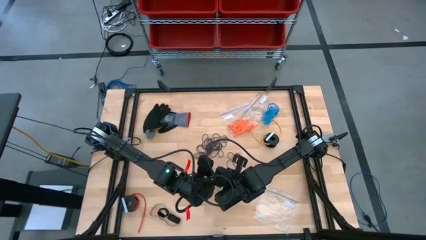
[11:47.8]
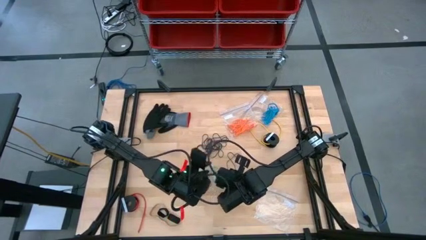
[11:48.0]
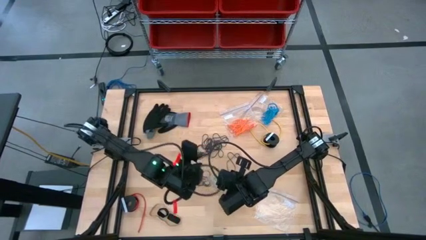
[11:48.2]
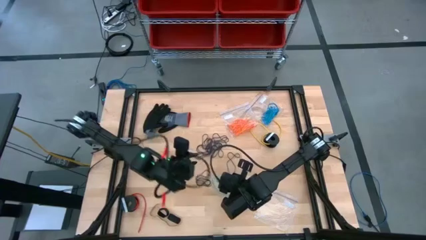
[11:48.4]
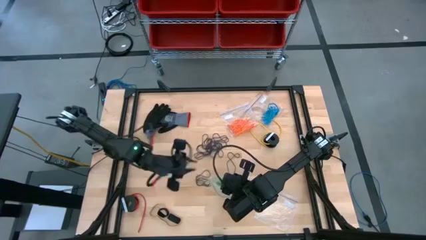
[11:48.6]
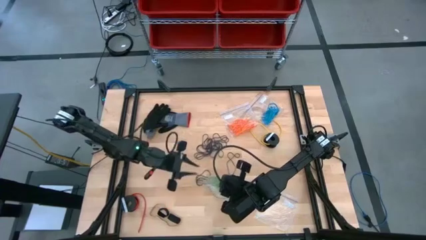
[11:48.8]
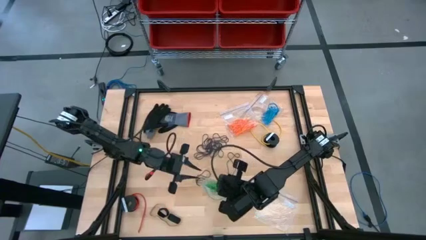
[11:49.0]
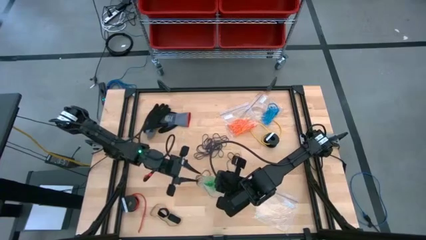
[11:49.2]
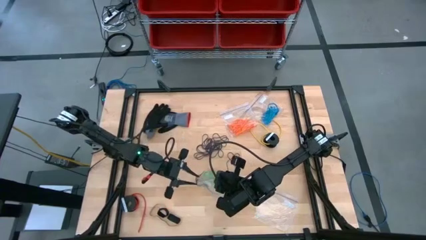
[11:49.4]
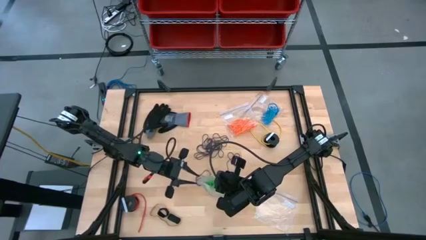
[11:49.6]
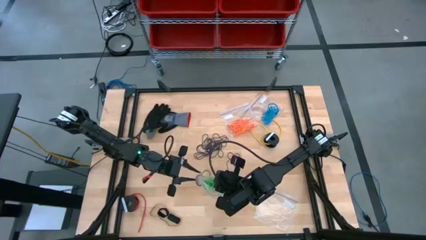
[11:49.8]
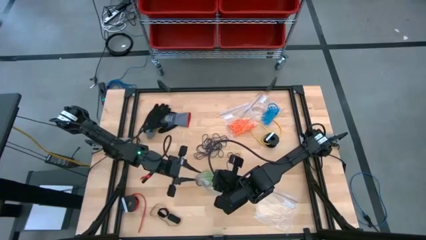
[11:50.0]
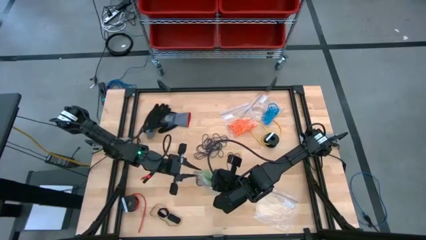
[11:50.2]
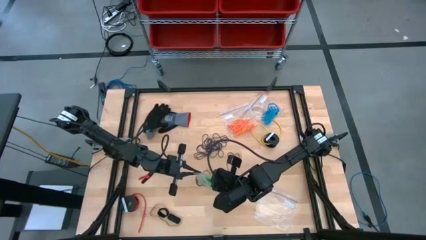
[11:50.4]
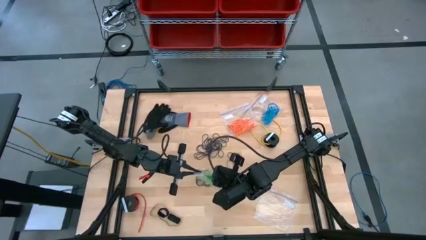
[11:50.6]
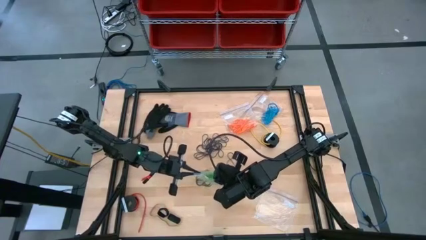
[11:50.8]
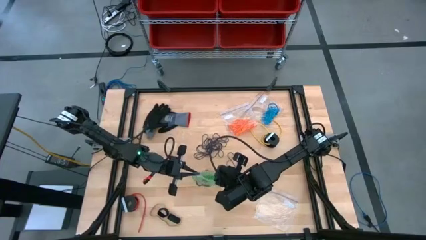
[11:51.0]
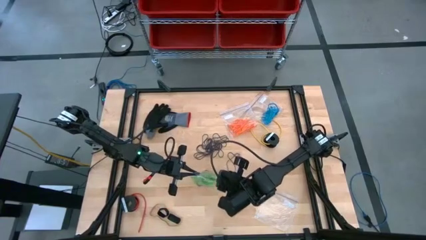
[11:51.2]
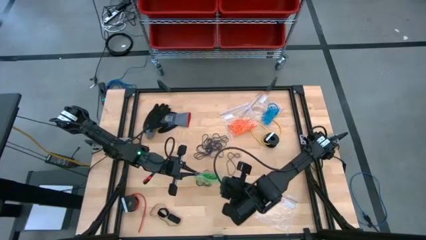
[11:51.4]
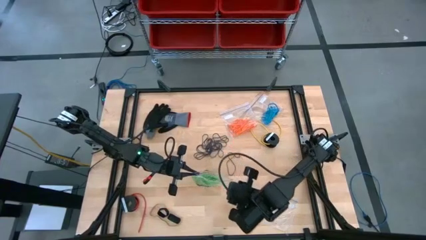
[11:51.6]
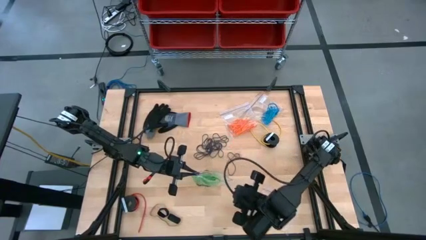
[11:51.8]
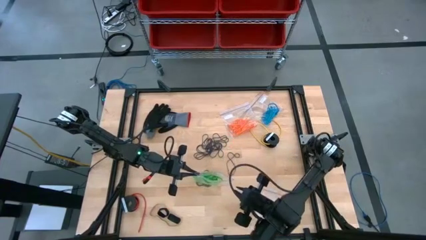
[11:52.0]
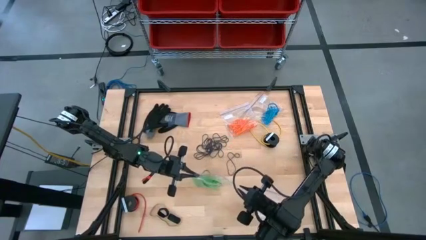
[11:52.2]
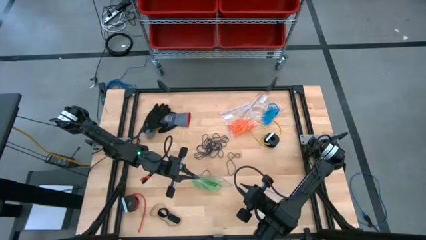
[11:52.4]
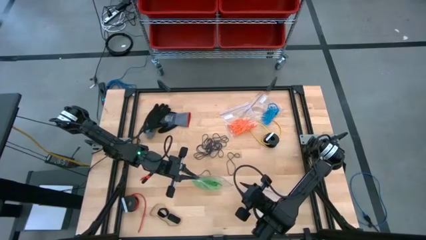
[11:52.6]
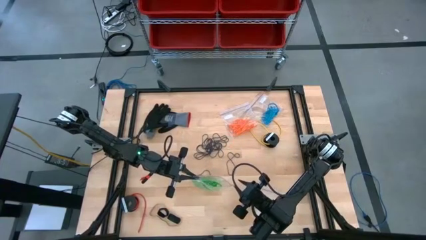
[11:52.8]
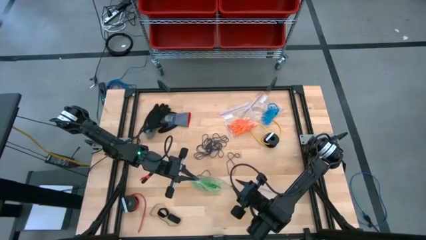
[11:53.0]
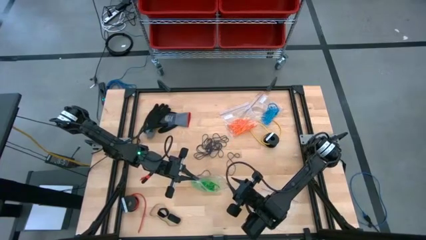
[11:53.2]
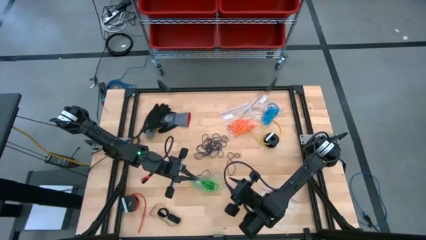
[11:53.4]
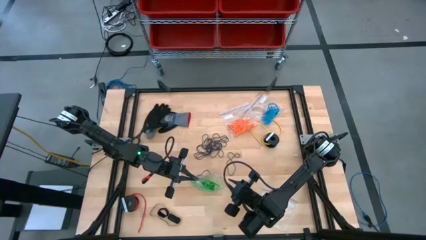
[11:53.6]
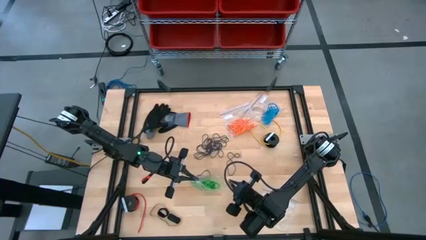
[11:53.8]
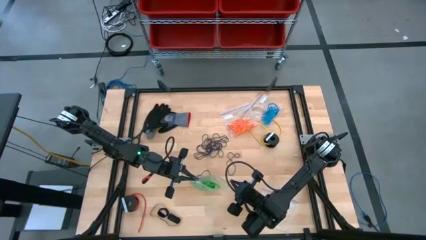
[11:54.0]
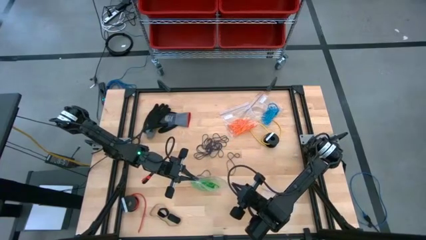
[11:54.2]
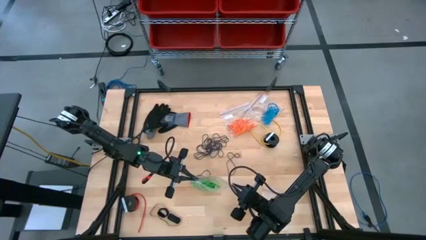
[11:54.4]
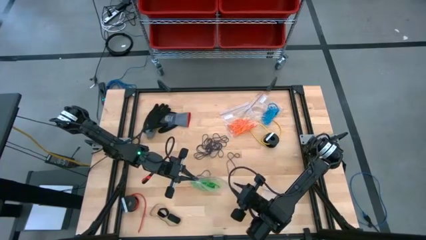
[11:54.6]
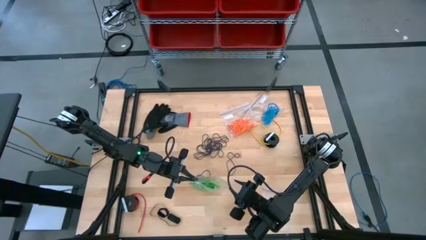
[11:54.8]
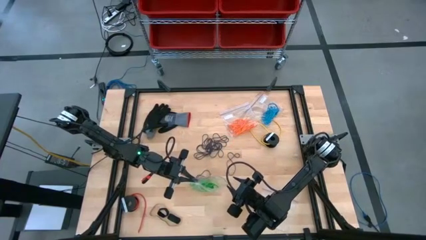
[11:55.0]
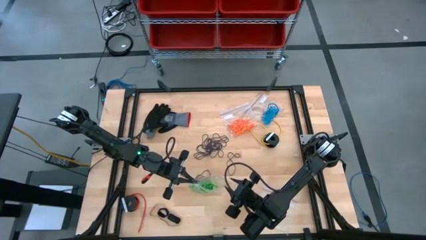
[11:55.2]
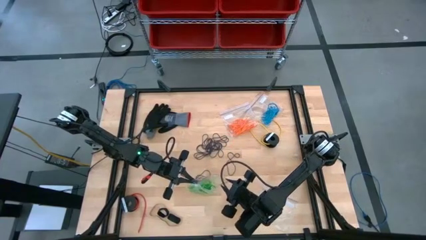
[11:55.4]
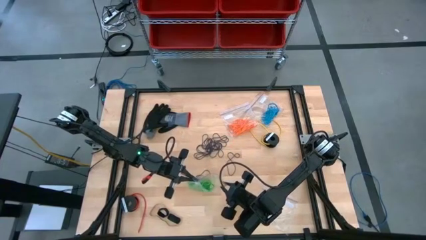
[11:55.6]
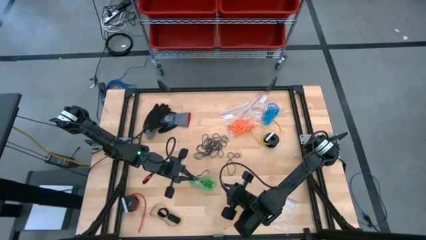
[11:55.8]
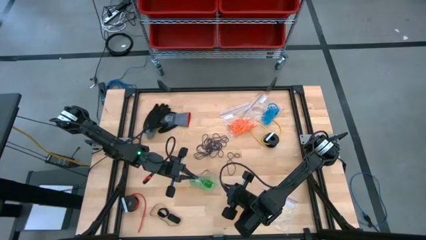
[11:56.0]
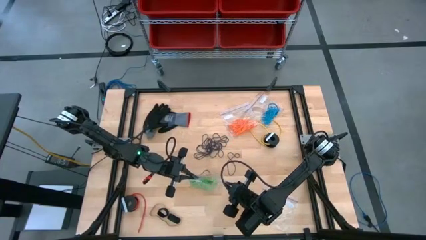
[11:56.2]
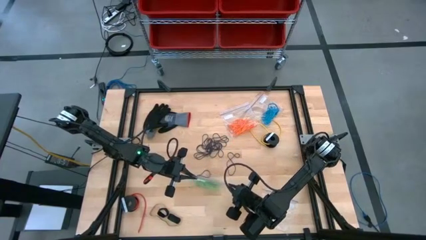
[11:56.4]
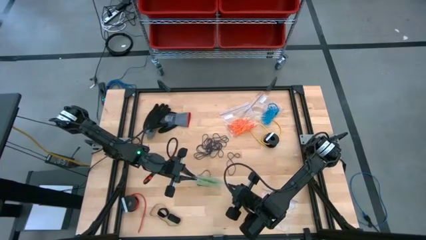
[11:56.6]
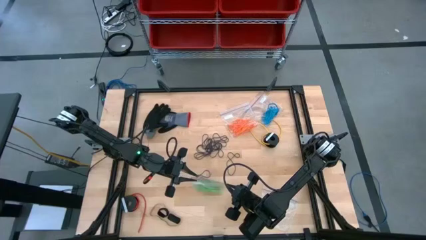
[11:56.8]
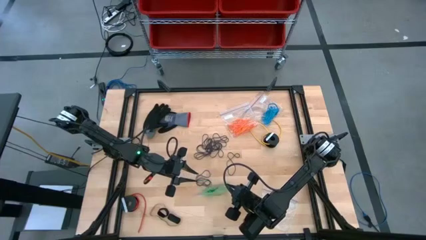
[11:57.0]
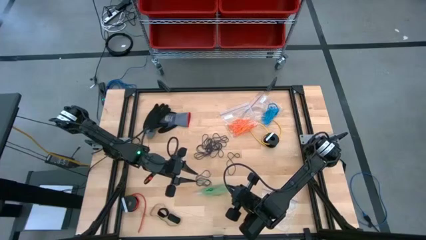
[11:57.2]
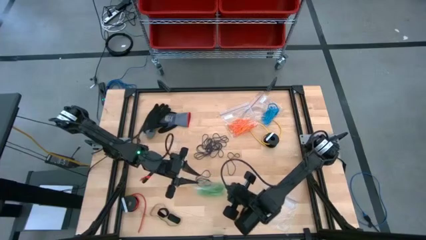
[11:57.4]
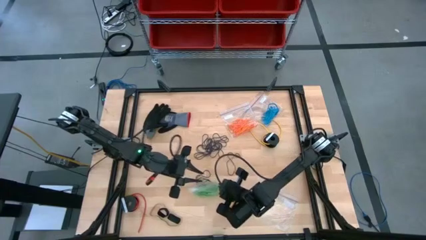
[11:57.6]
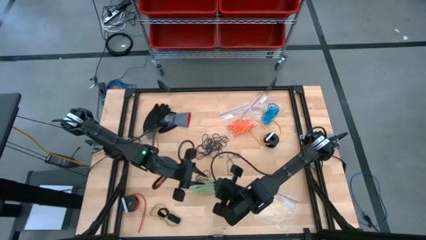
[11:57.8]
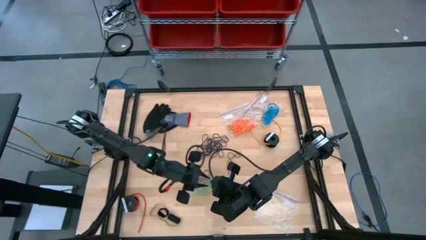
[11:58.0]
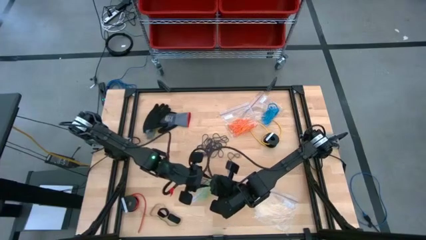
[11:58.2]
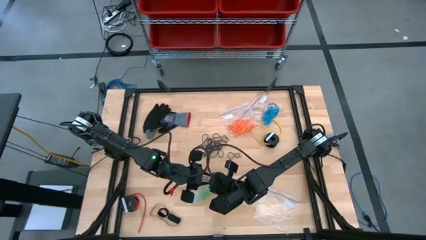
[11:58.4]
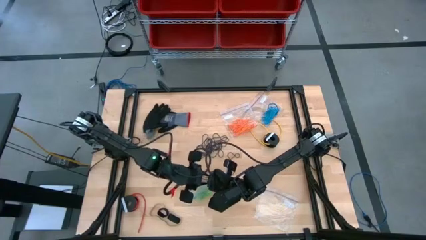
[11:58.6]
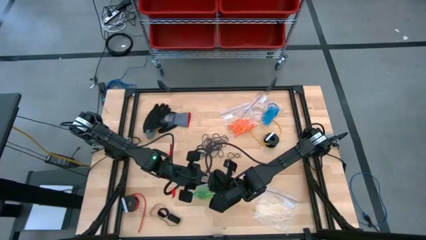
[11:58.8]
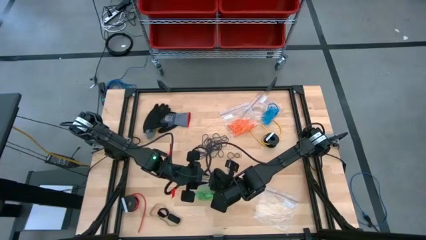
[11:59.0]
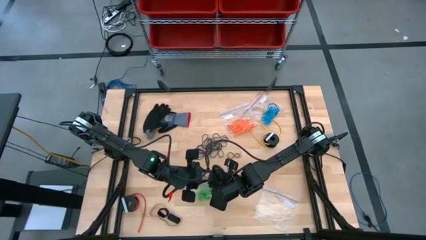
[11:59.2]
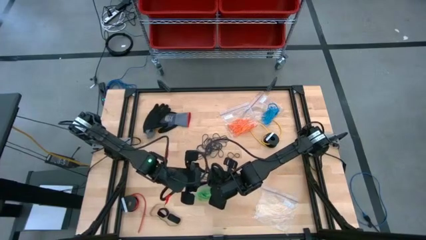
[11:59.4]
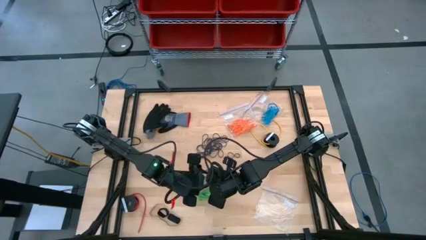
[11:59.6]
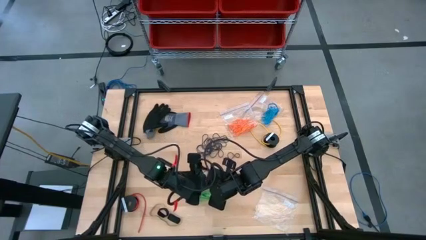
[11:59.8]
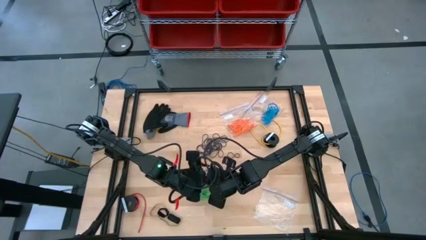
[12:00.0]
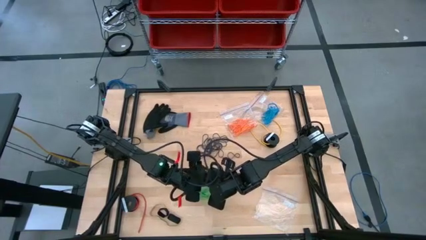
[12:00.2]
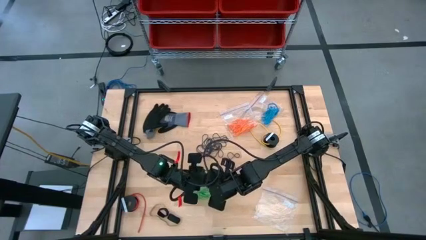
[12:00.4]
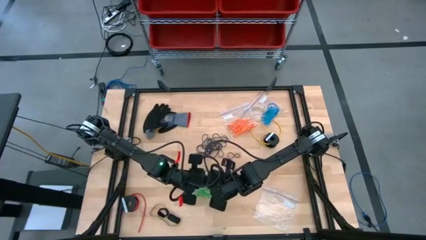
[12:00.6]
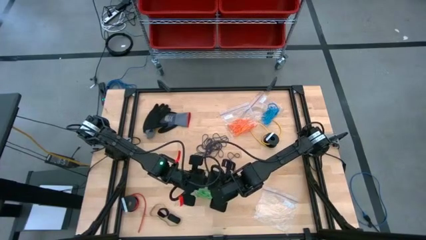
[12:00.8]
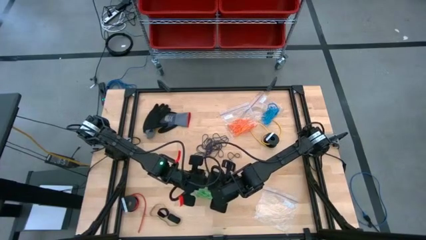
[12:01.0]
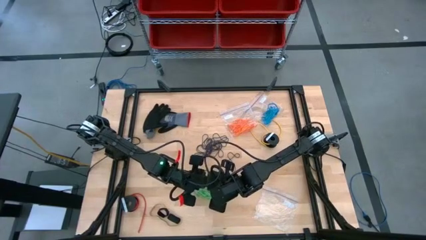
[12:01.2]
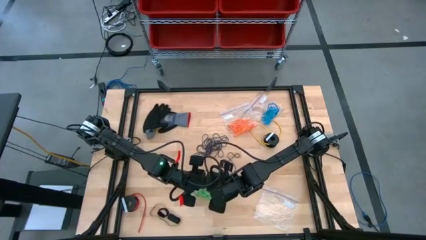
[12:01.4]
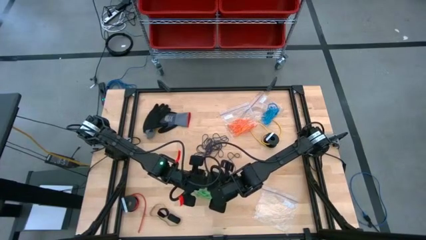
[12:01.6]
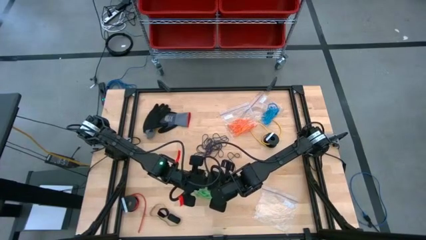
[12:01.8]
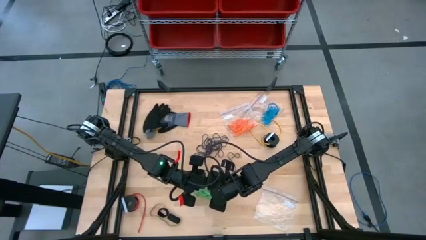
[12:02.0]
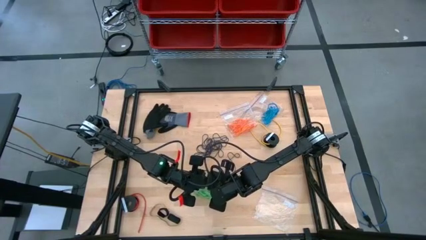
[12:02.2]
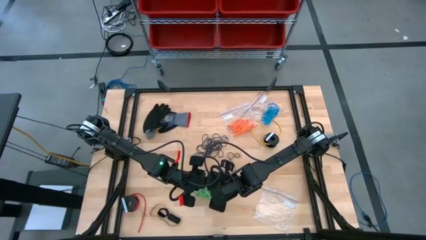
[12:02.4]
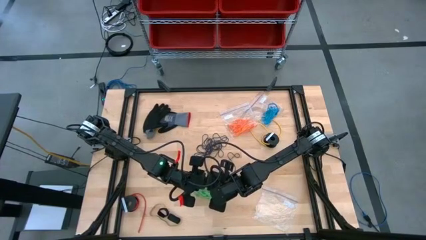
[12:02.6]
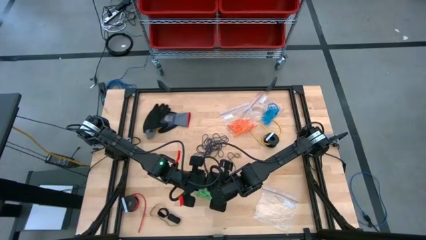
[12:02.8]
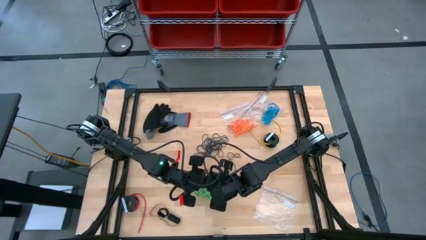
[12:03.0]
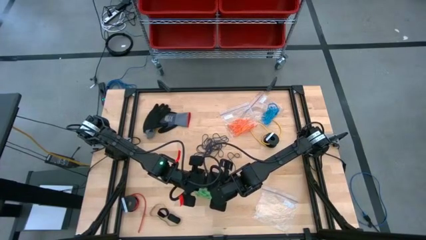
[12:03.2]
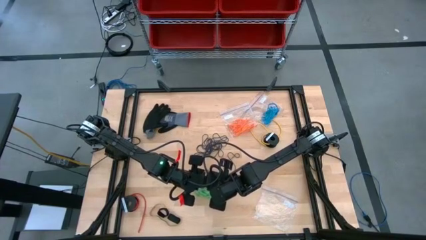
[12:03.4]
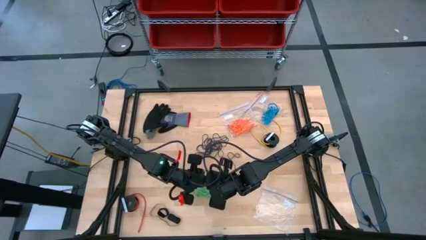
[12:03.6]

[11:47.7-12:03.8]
Task: Sort rubber bands
Close the transparent zip bag
